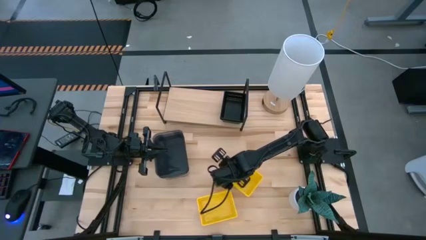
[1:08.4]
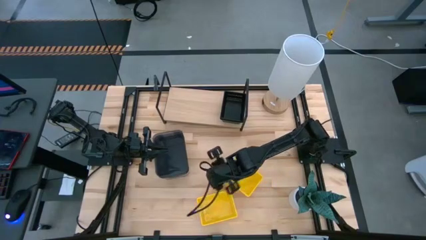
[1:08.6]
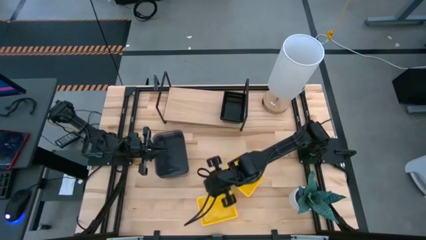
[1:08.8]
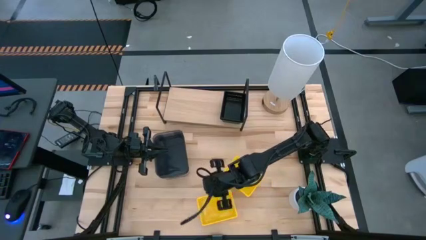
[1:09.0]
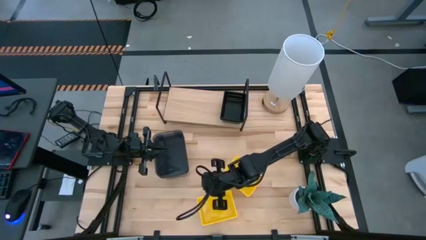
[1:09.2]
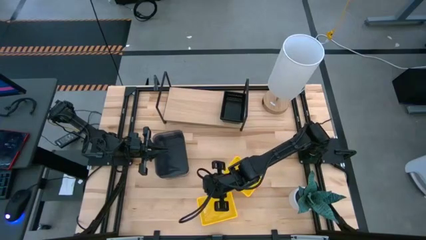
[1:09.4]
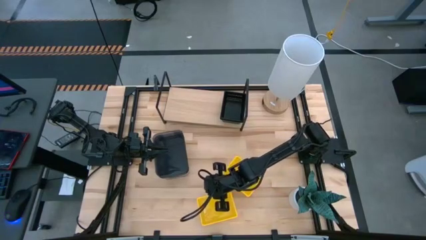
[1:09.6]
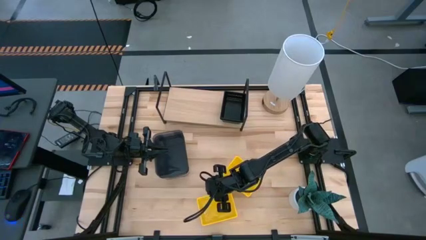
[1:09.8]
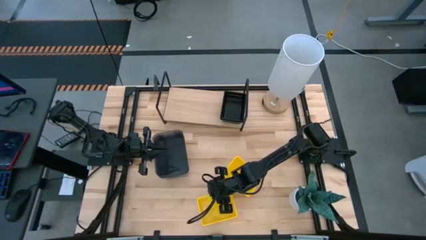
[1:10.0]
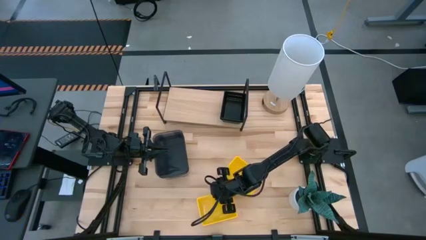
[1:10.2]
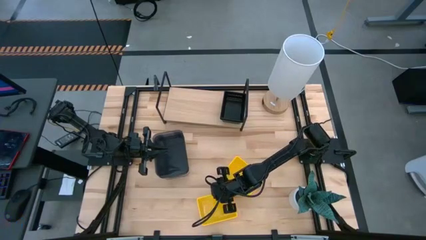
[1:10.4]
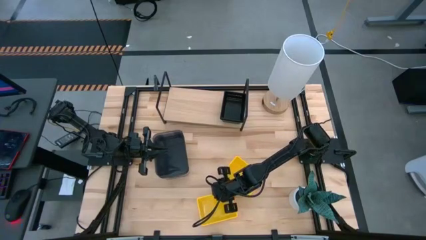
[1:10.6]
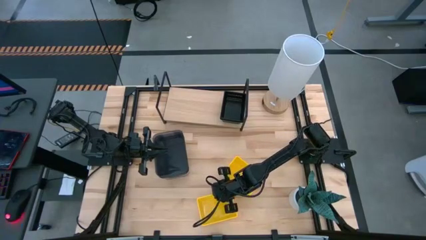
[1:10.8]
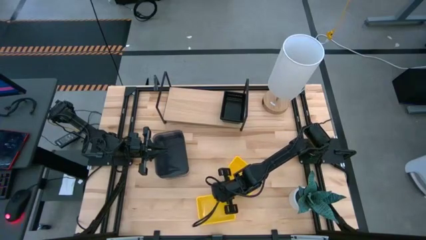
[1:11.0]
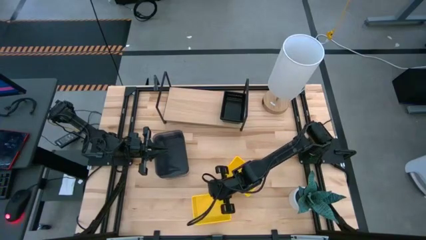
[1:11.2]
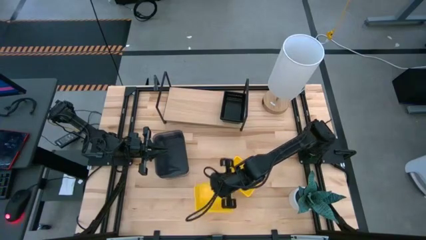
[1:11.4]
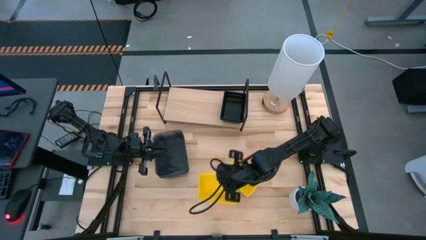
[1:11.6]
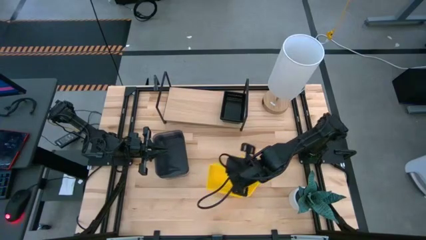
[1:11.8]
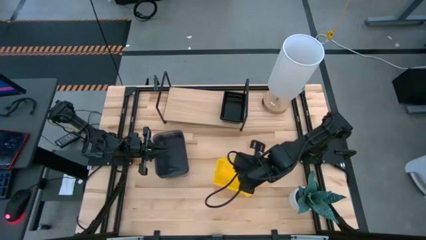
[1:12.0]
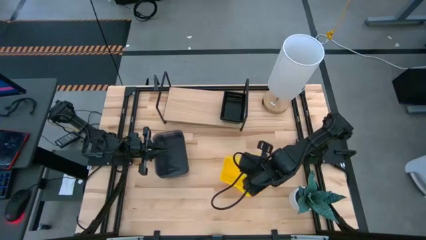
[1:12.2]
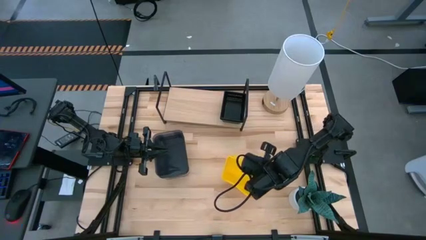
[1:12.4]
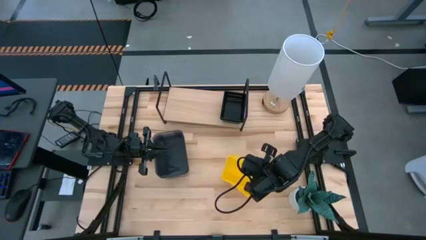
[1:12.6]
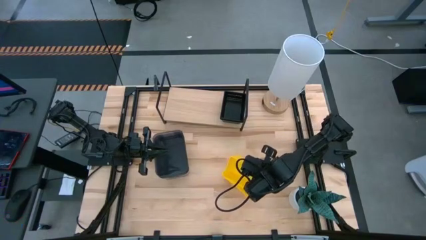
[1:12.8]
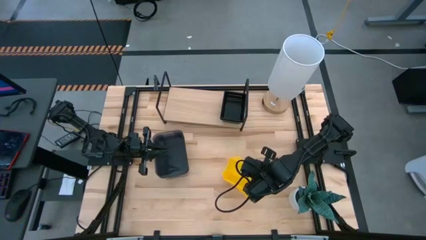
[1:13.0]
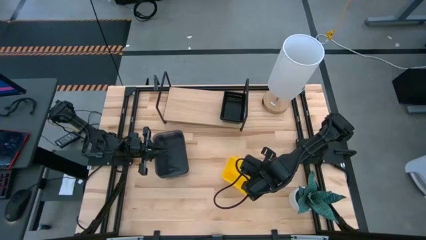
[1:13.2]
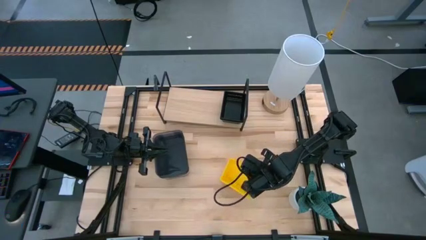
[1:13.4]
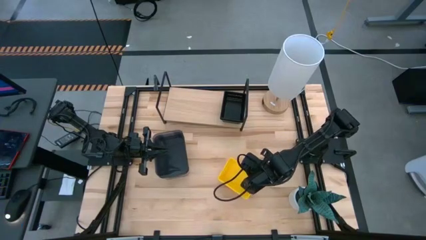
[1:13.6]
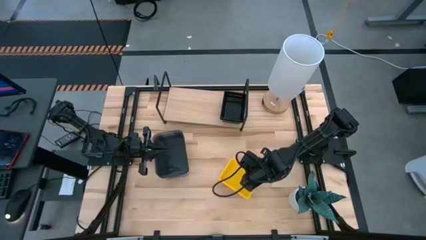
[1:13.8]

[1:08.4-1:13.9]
Task: Stack baskets on shelf by color
Stack the bottom yellow basket on top of the top yellow stacked baskets

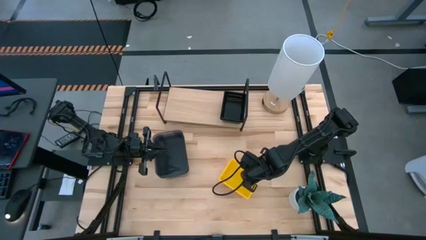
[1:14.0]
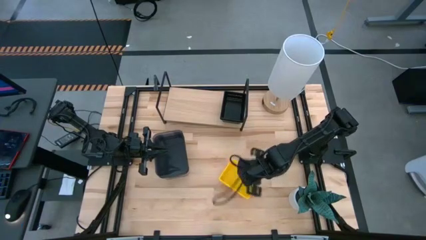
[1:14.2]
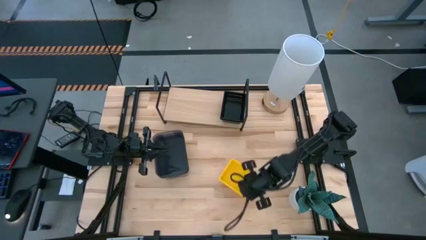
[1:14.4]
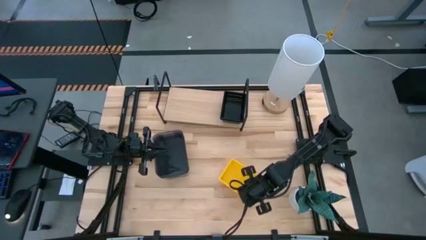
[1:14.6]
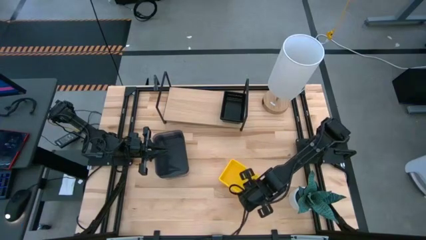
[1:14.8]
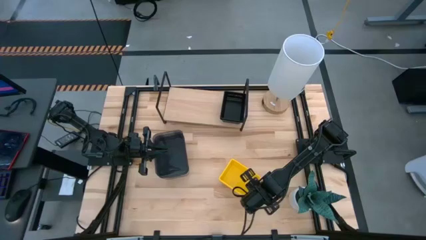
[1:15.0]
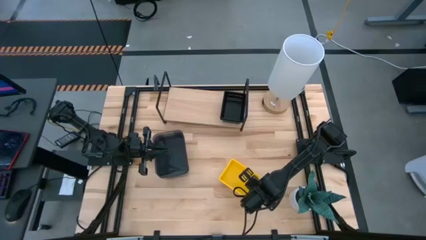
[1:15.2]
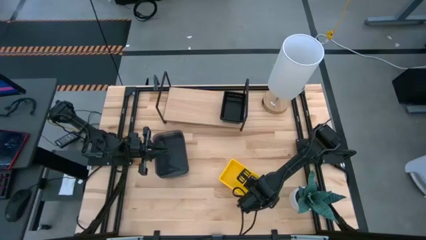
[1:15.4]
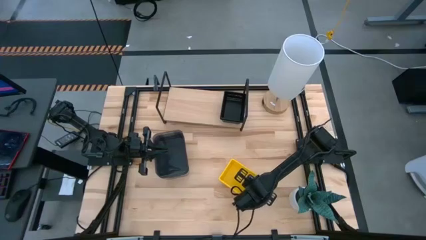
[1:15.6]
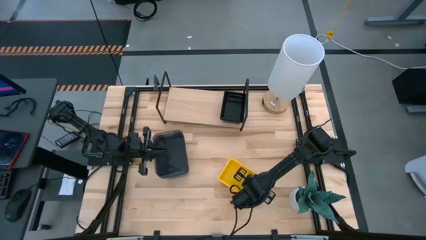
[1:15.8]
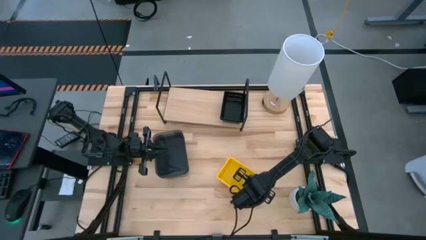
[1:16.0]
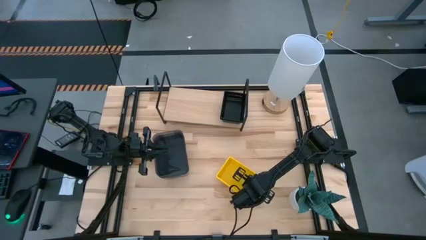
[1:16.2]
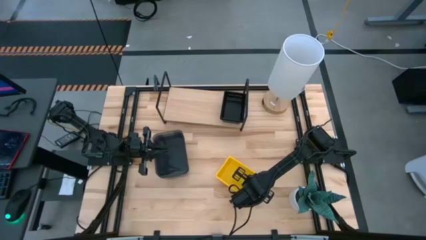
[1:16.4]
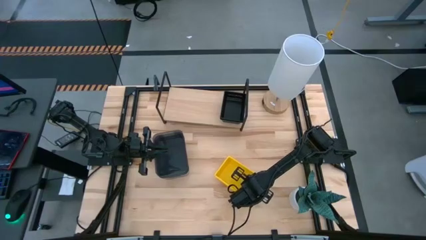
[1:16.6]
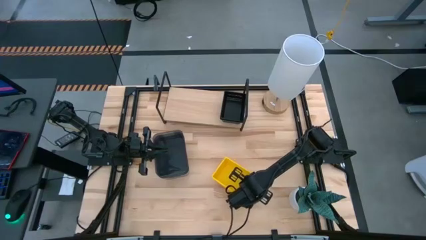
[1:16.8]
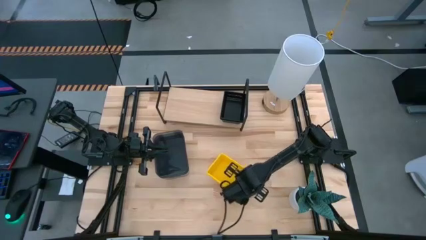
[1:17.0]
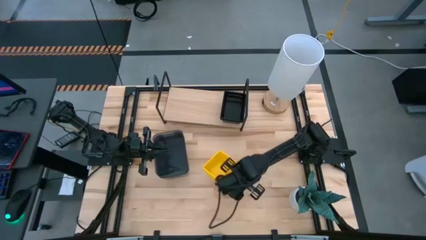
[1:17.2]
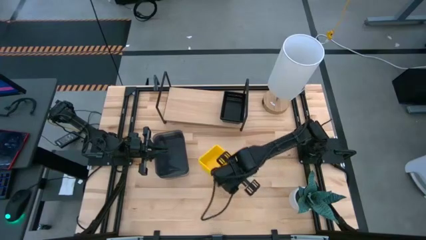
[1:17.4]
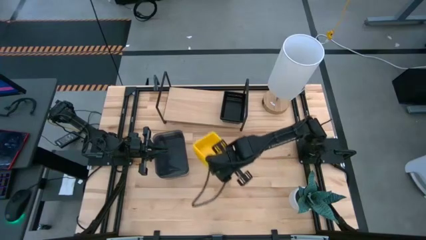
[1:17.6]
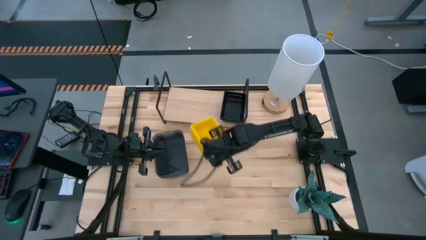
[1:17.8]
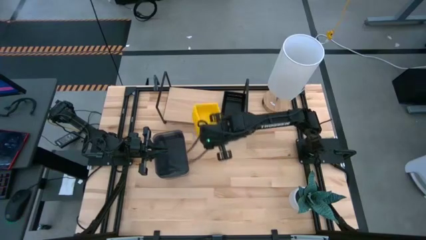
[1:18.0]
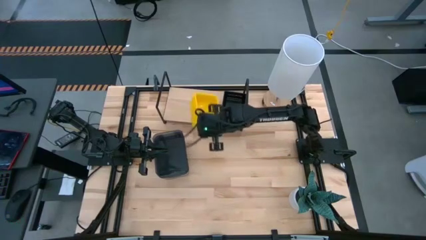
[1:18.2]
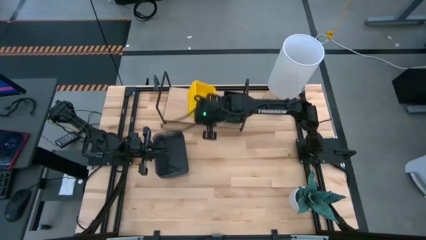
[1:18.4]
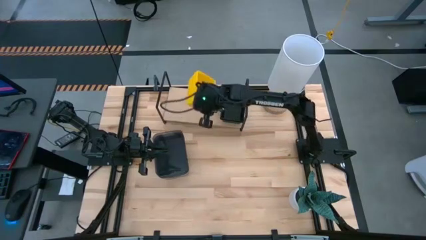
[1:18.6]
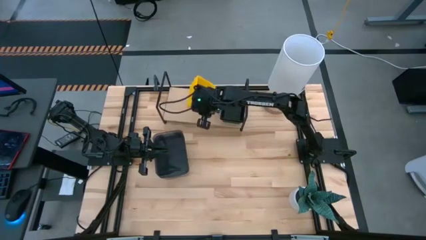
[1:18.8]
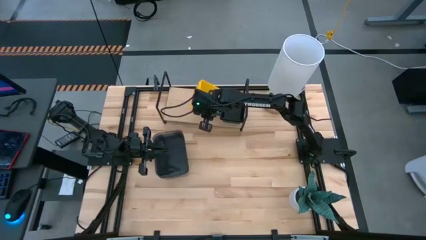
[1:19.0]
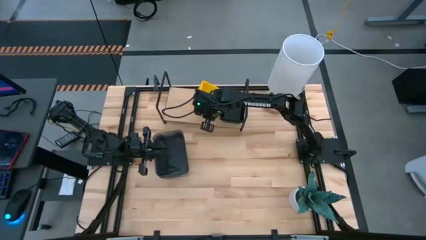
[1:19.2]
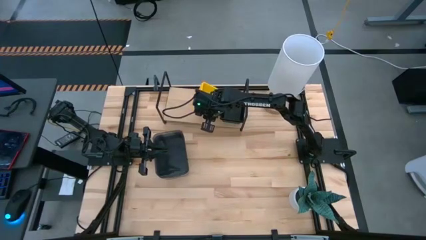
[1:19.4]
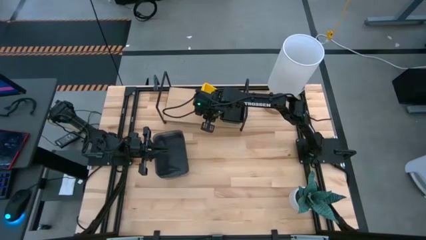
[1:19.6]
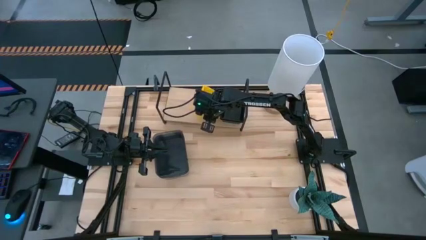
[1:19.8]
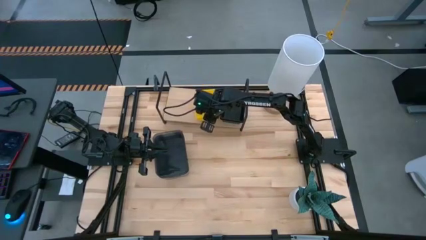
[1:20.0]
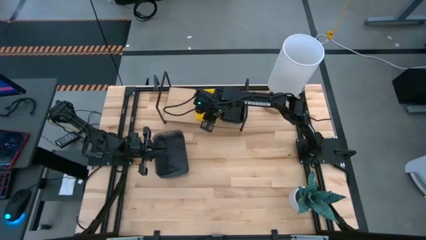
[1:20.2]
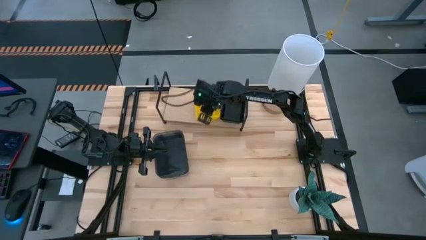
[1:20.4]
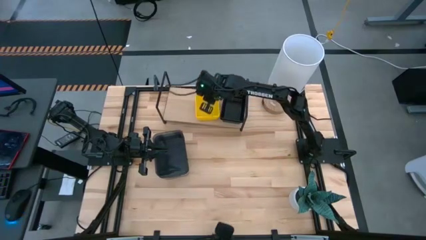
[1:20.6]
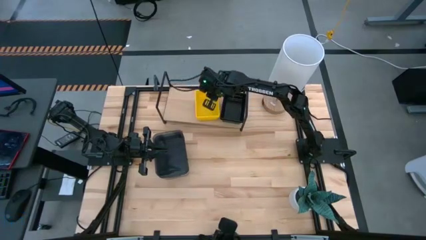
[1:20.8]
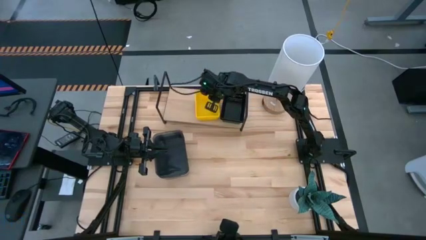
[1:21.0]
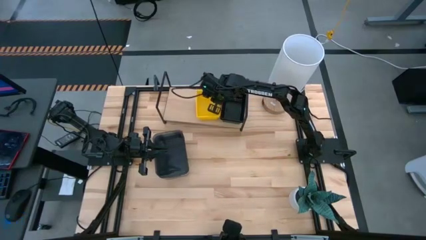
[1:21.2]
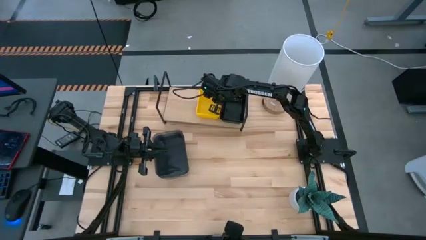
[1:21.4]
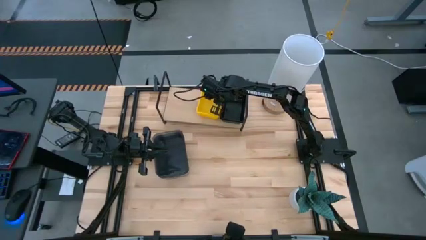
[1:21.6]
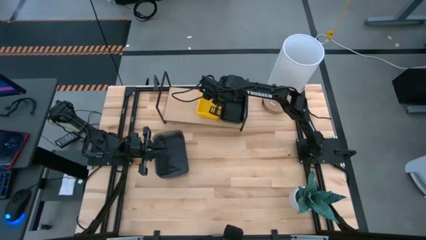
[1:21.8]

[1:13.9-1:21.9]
Put the stacked yellow baskets on the shelf
